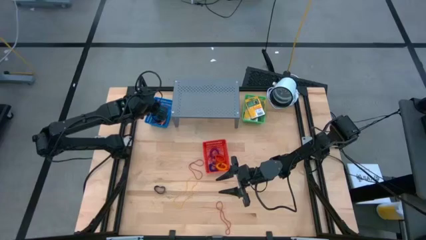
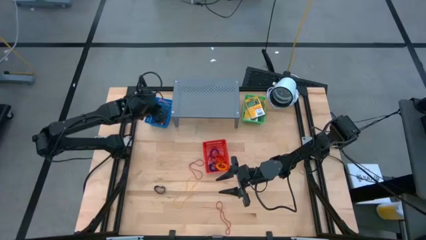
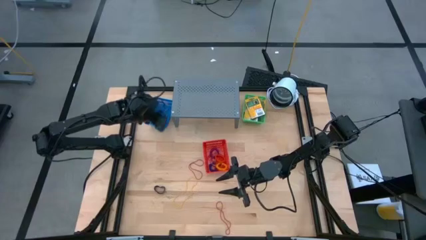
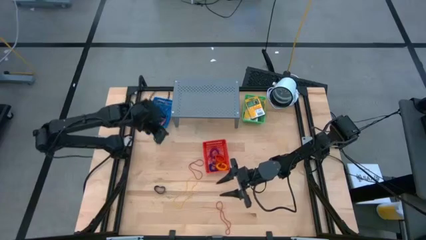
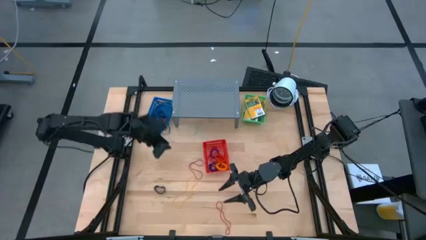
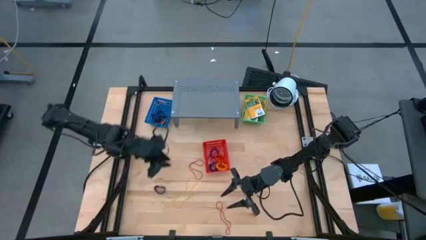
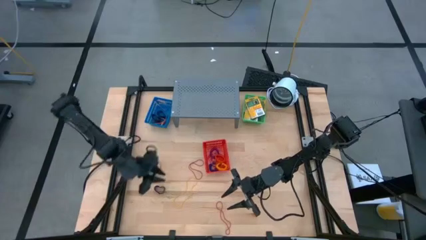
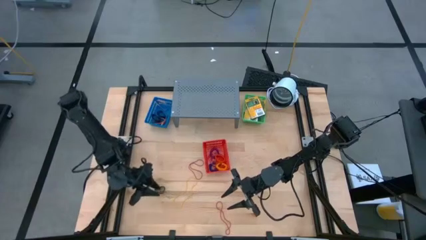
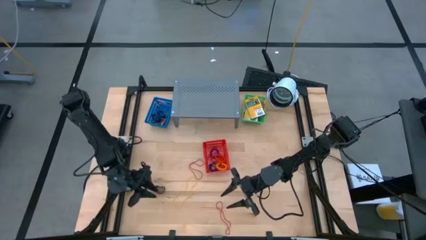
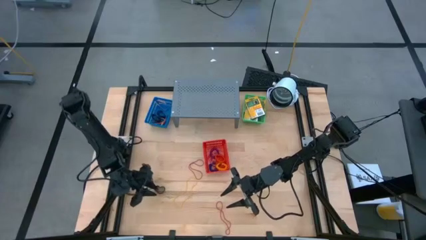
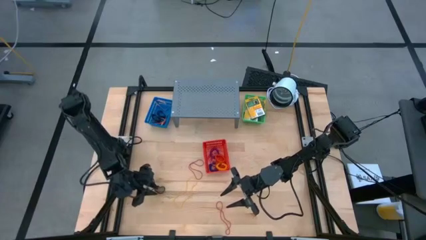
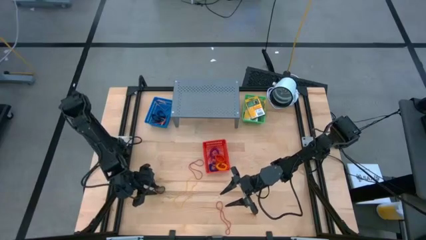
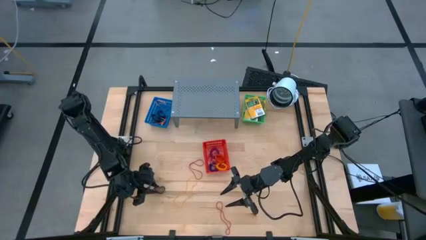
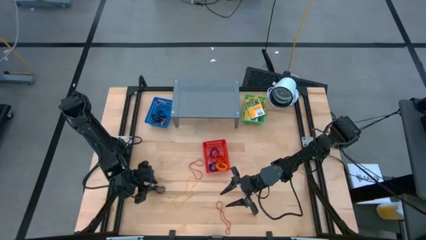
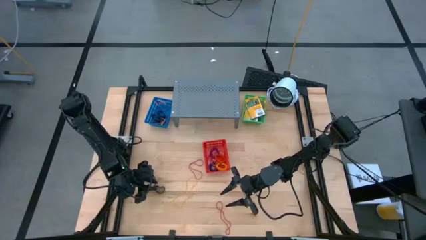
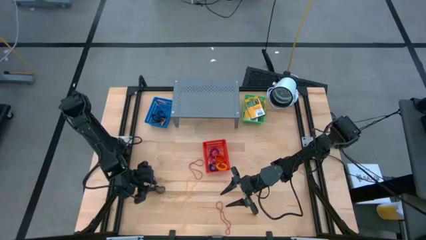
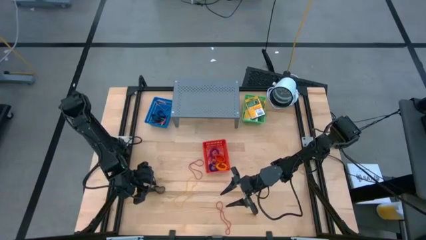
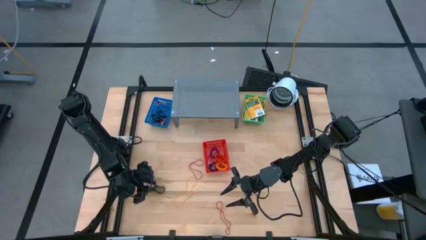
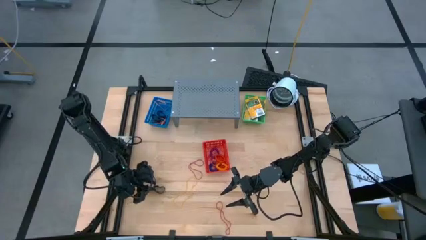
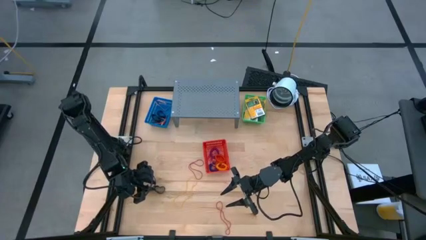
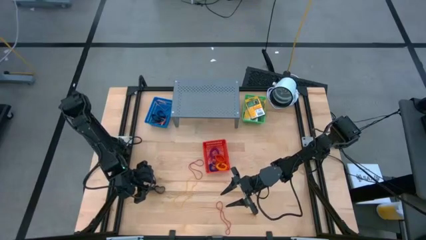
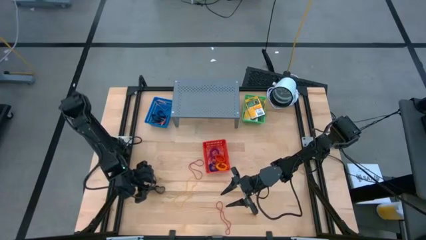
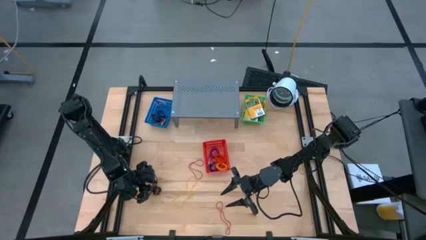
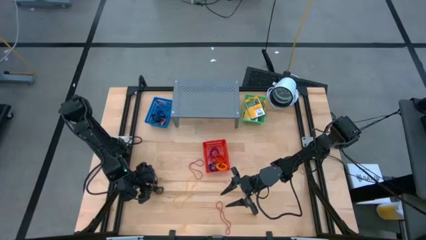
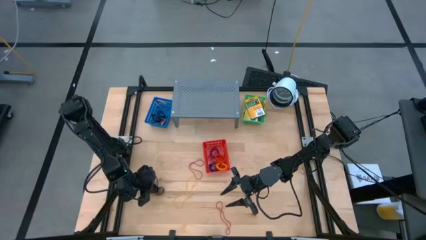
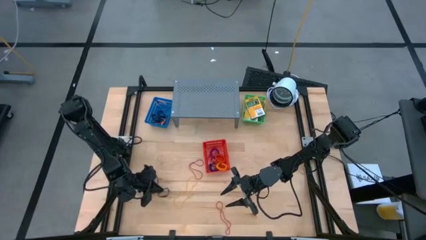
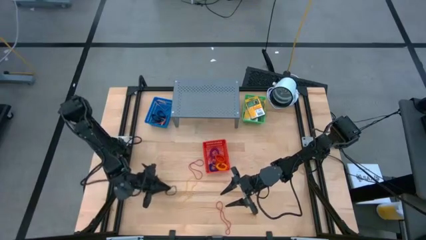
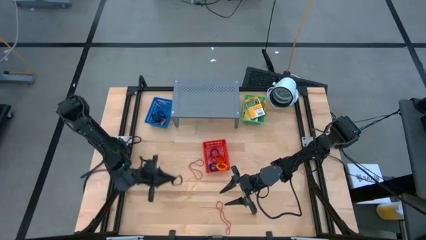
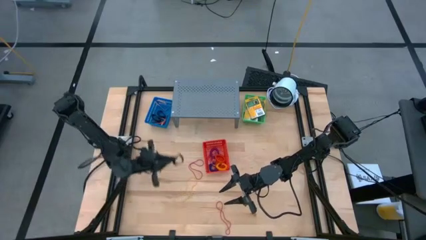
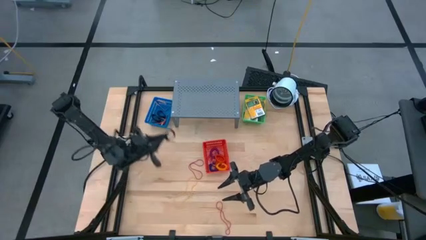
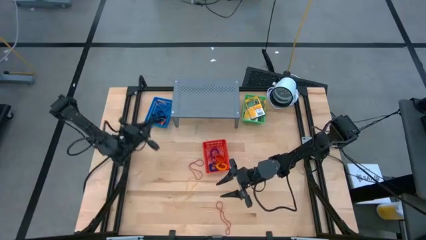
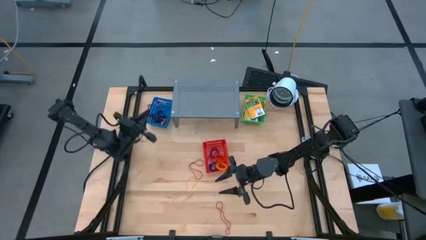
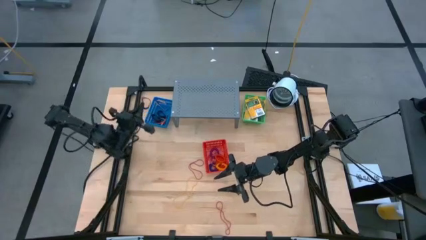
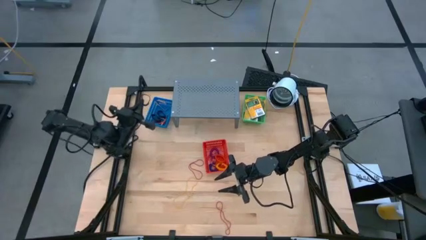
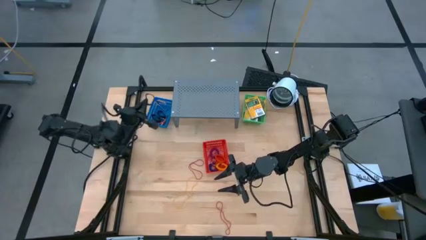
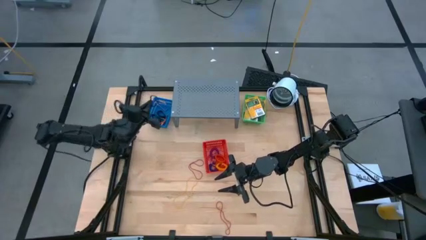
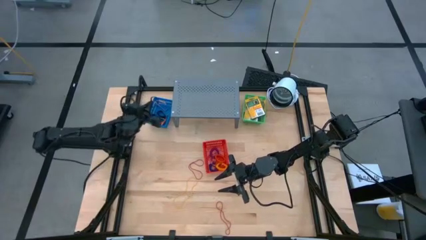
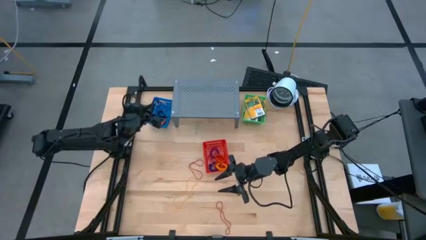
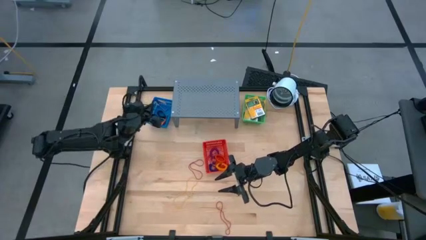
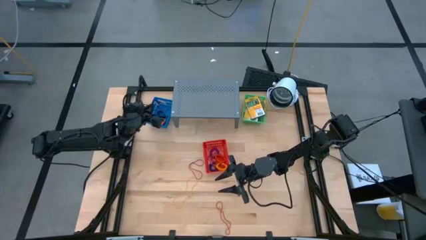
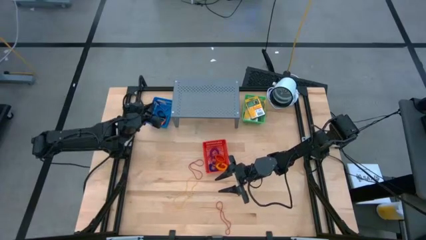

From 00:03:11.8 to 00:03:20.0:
Task: Pick & Place Office Desk Supplies
Put the black rubber band into the blue basket

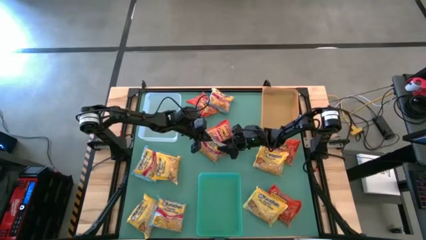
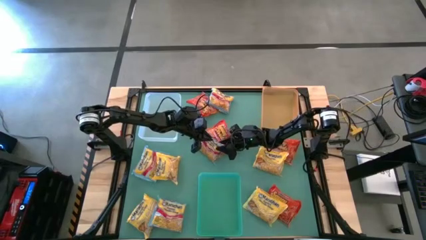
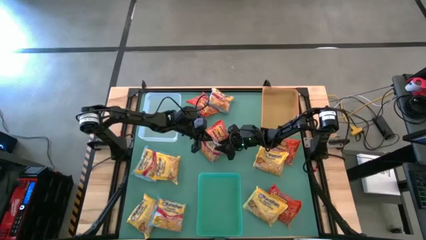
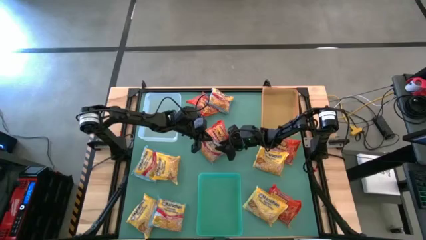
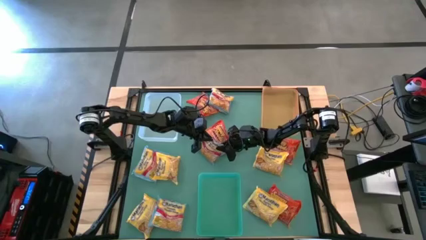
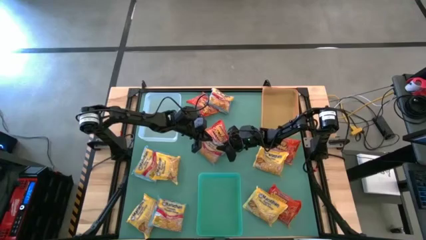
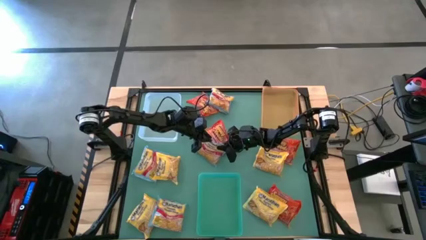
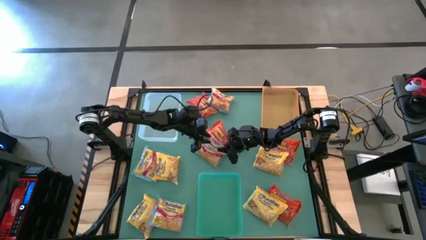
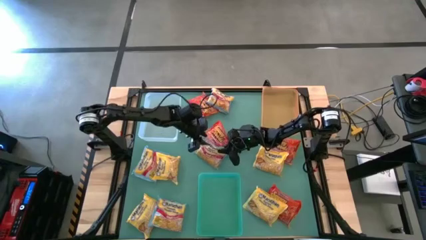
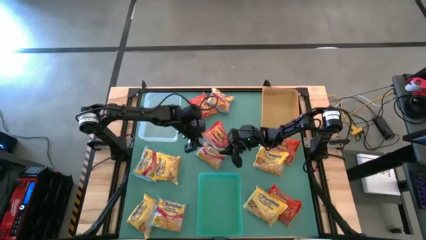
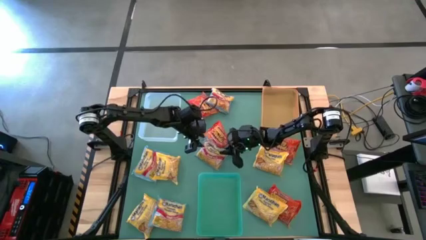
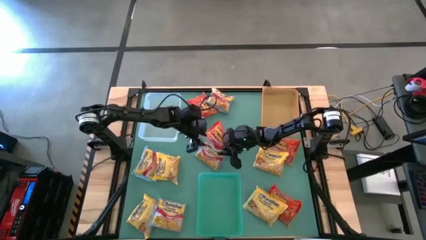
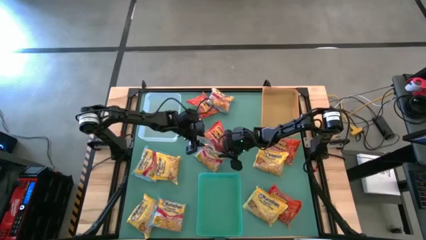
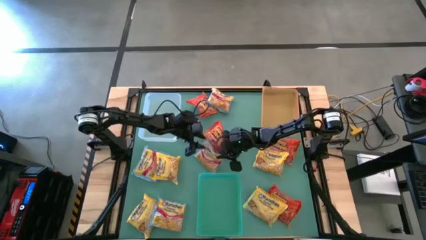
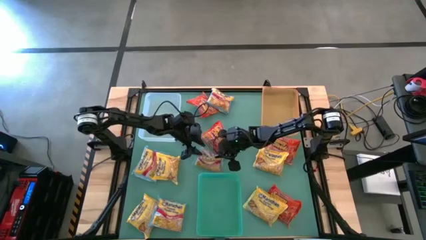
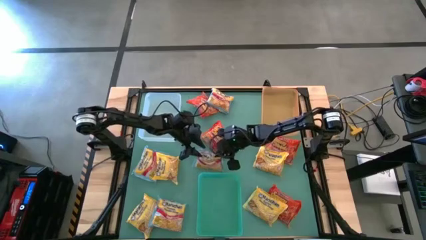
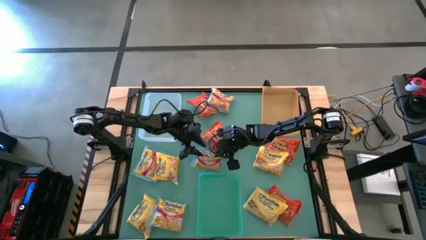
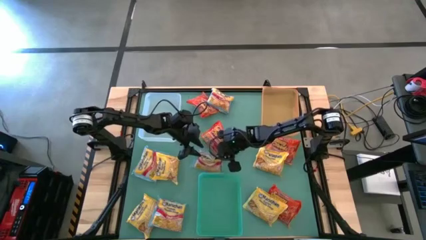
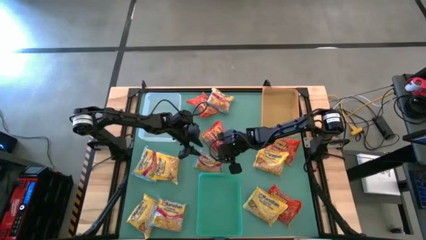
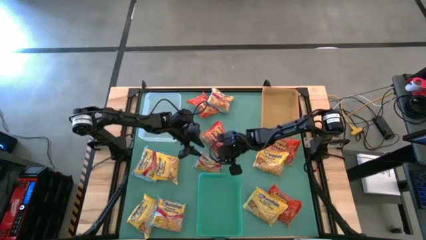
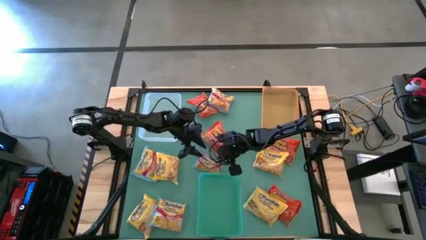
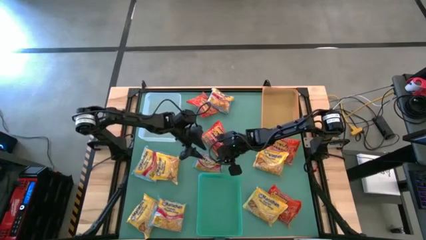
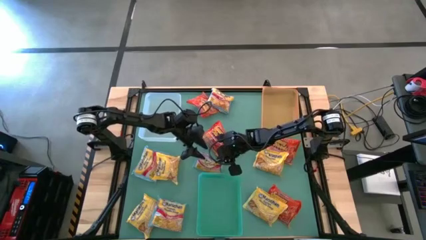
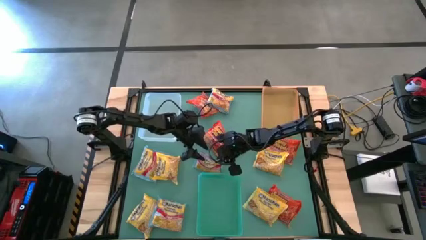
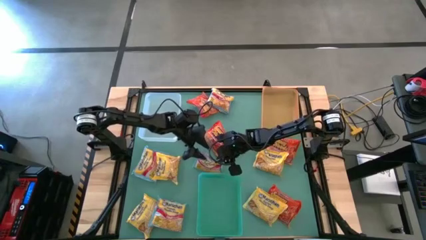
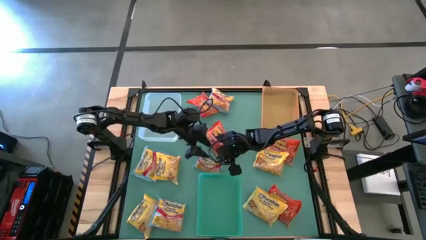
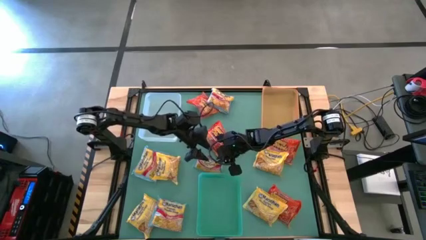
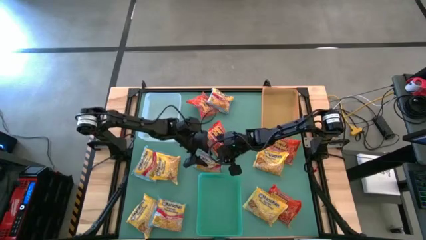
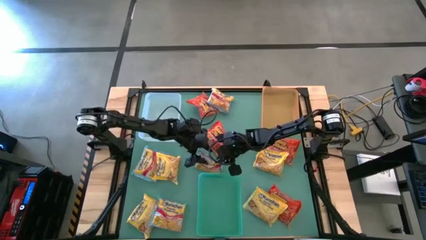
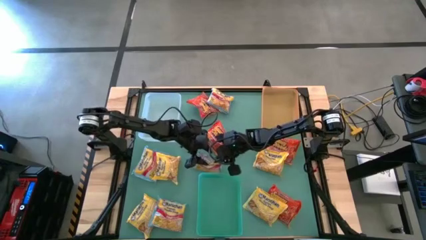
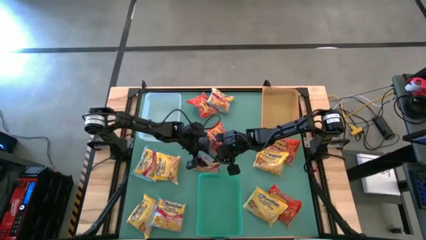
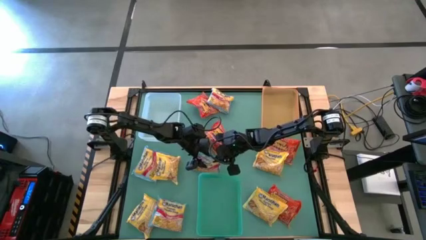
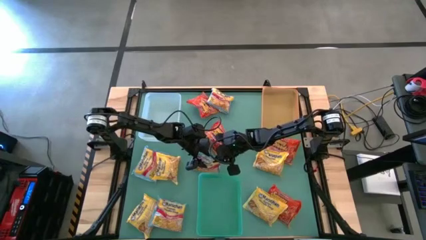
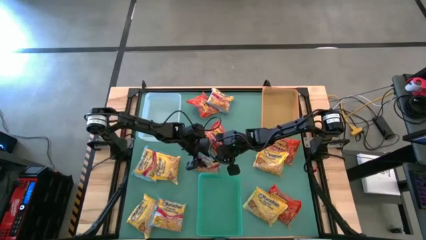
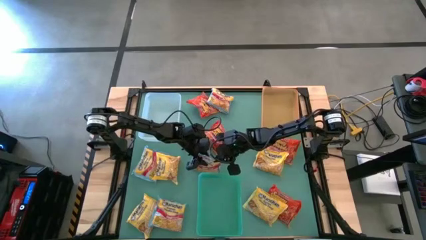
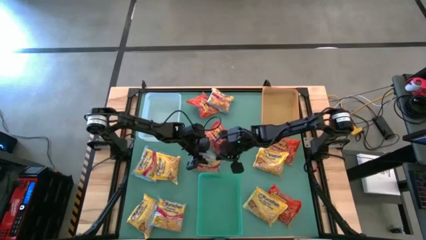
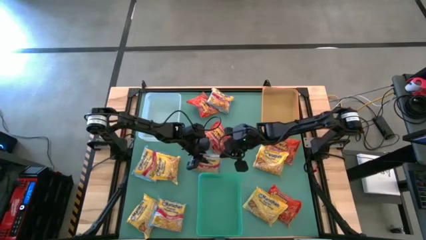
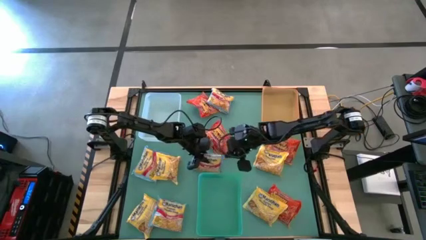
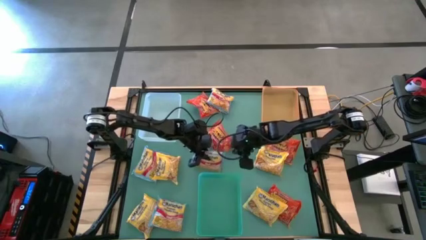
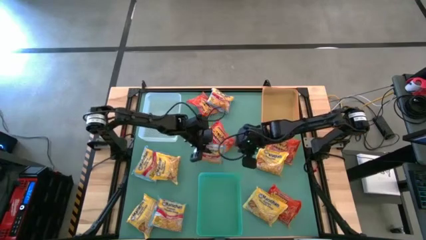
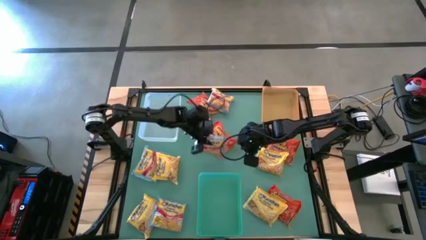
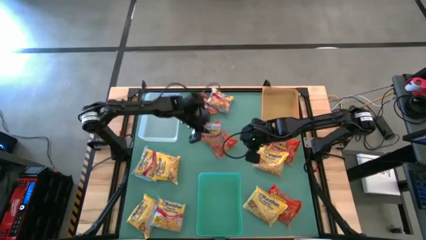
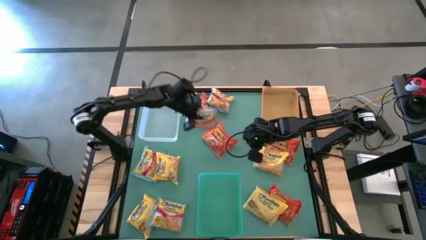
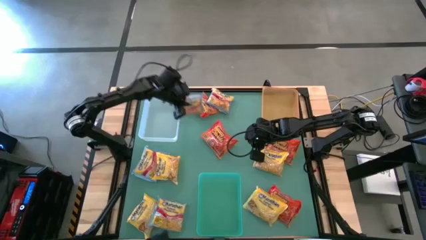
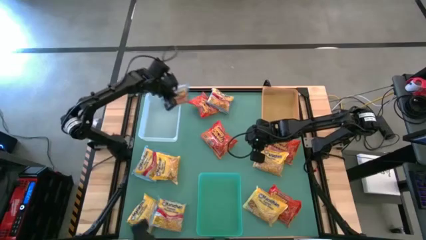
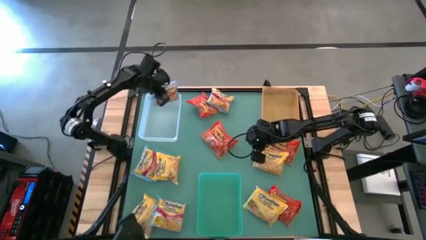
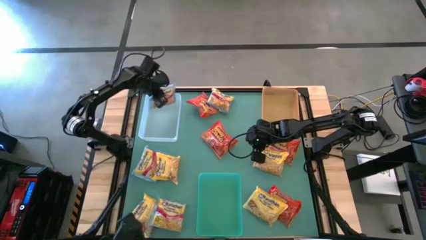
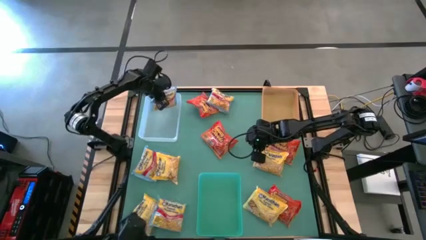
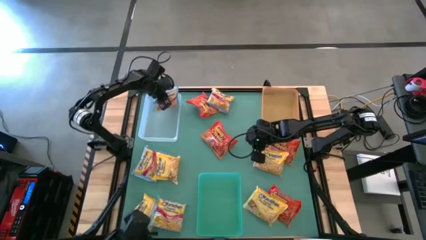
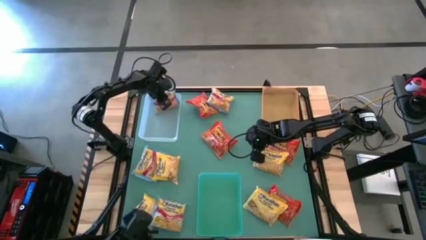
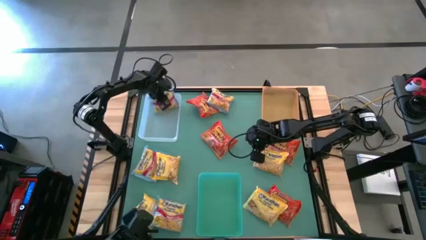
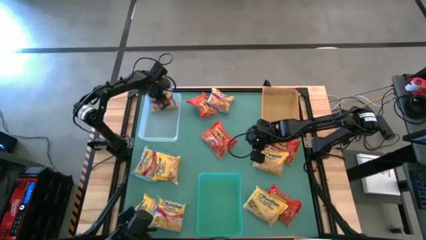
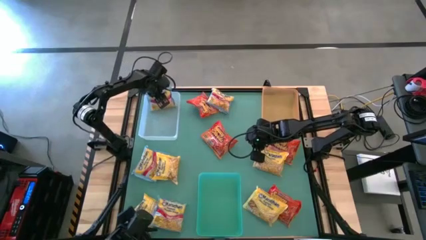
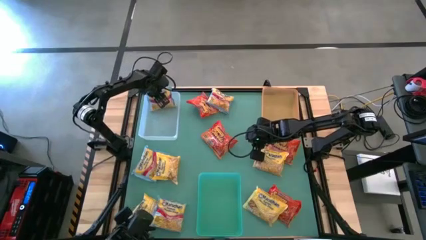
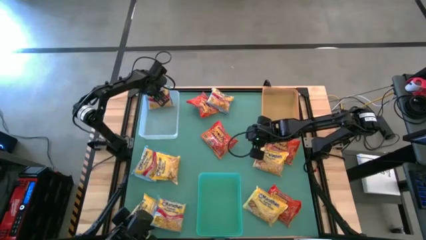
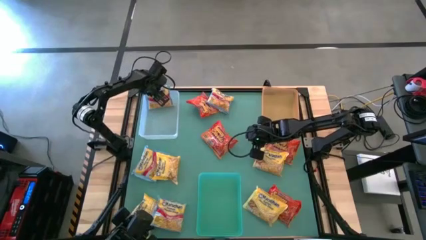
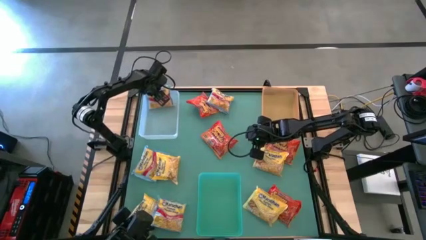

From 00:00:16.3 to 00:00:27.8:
Task: Sort Maruchan noodles
Put the blue noodle pack into the transparent bin
